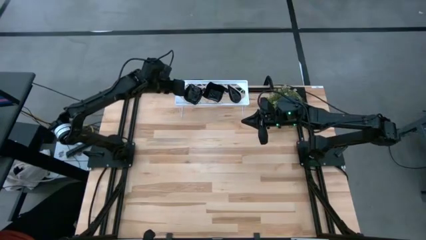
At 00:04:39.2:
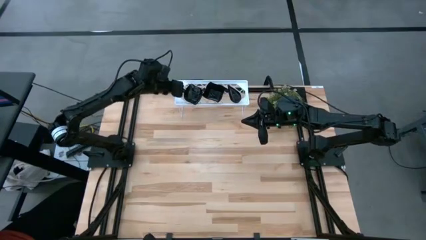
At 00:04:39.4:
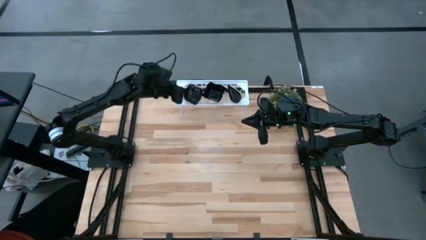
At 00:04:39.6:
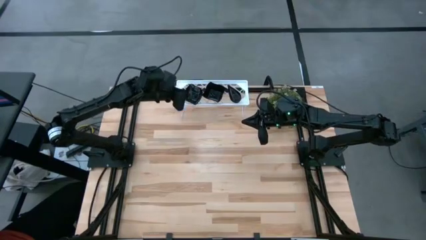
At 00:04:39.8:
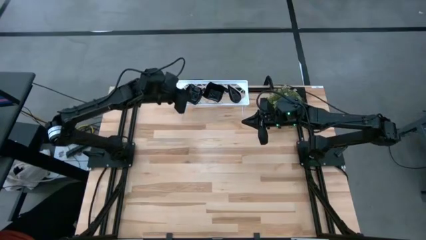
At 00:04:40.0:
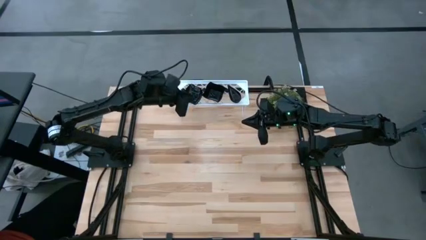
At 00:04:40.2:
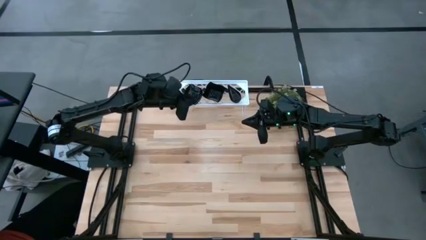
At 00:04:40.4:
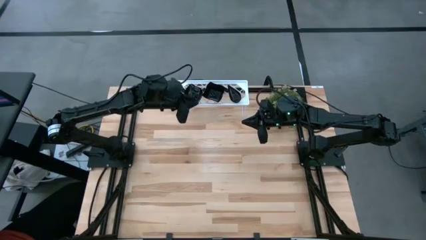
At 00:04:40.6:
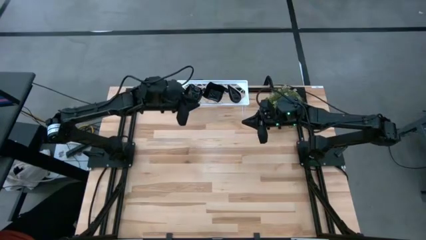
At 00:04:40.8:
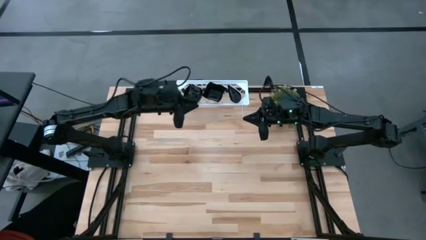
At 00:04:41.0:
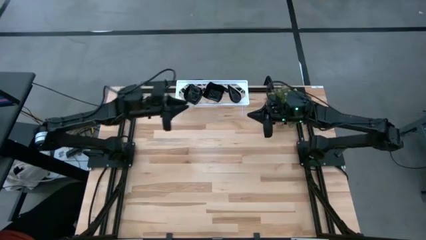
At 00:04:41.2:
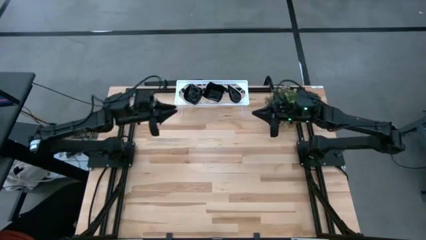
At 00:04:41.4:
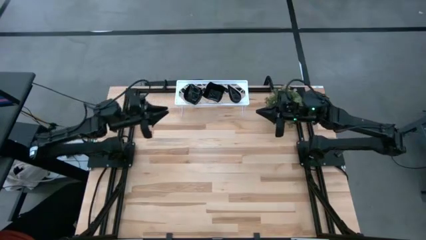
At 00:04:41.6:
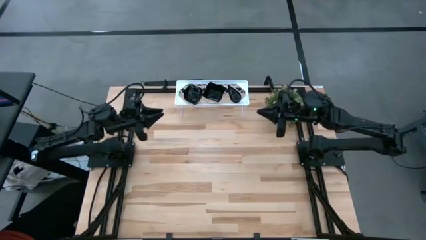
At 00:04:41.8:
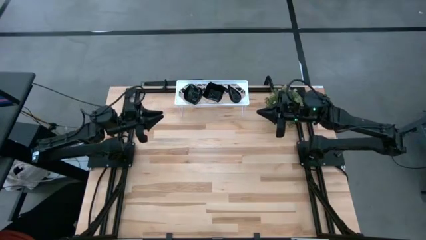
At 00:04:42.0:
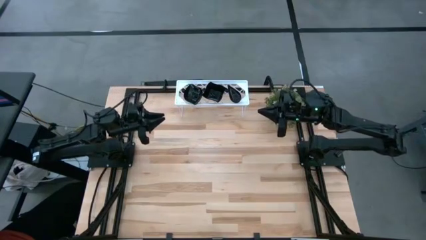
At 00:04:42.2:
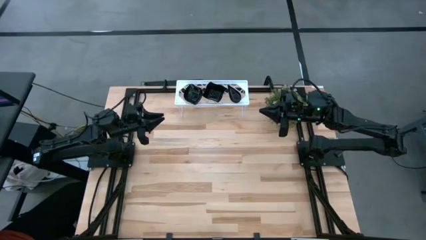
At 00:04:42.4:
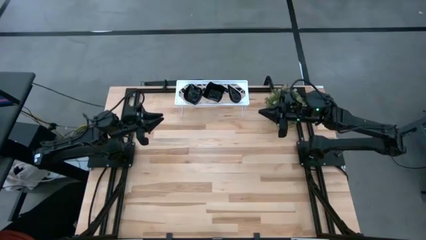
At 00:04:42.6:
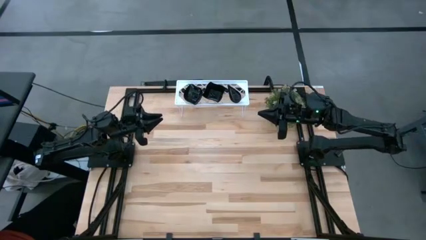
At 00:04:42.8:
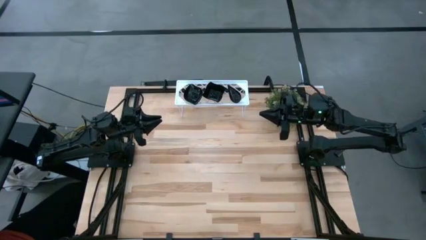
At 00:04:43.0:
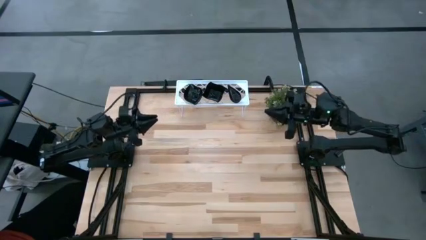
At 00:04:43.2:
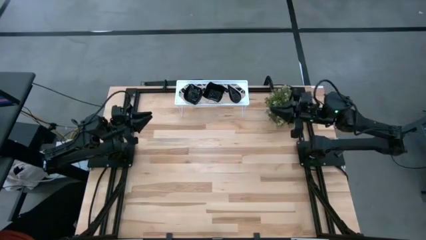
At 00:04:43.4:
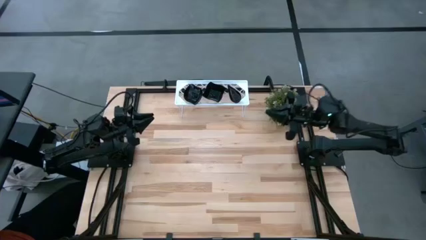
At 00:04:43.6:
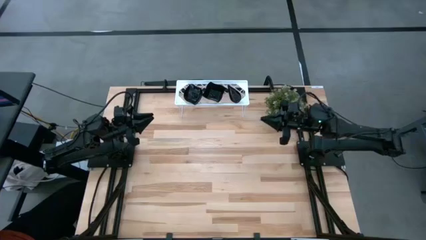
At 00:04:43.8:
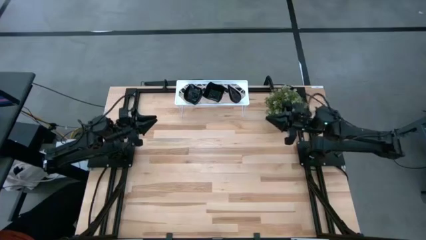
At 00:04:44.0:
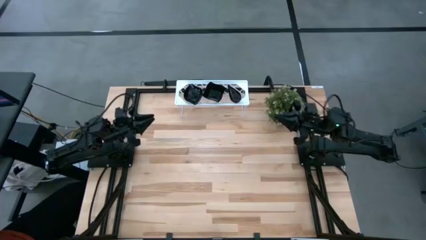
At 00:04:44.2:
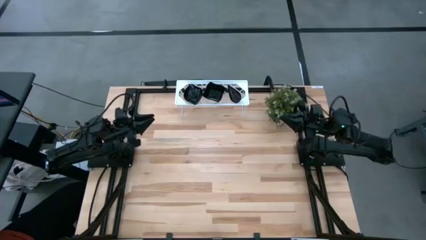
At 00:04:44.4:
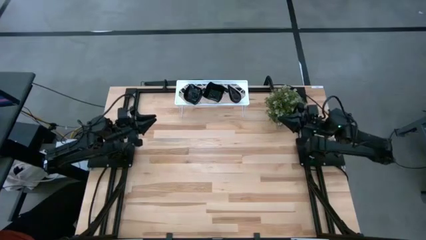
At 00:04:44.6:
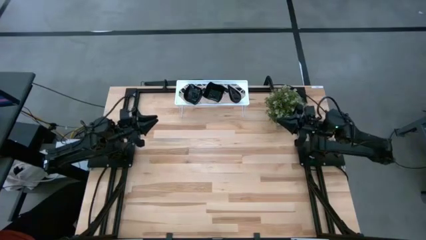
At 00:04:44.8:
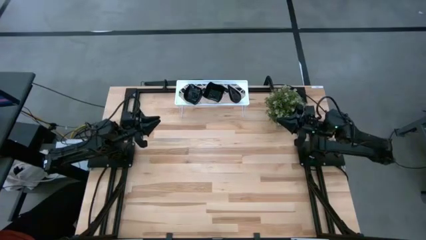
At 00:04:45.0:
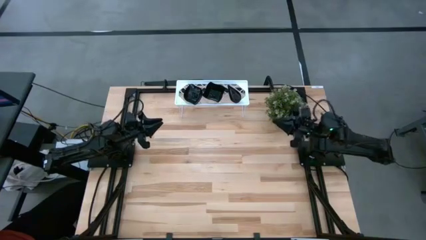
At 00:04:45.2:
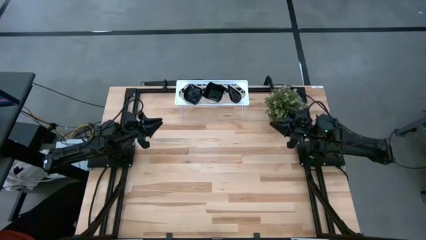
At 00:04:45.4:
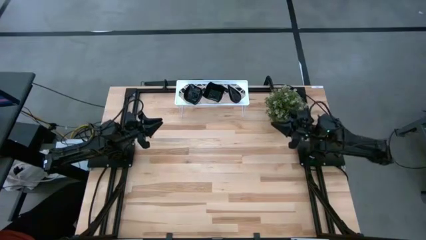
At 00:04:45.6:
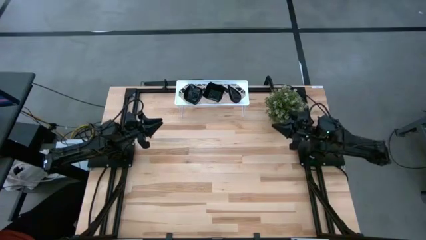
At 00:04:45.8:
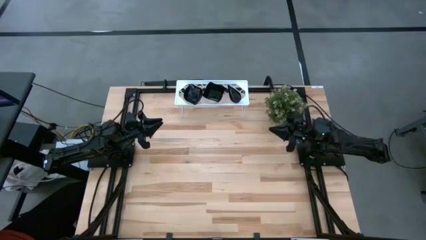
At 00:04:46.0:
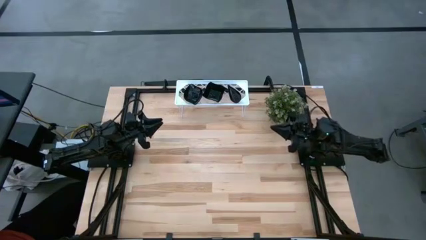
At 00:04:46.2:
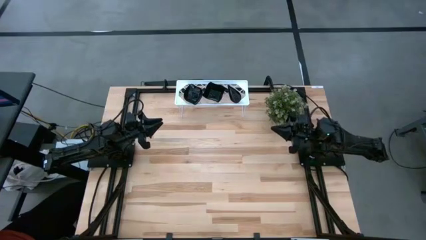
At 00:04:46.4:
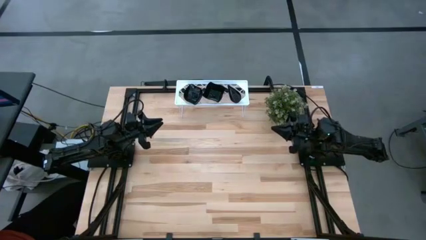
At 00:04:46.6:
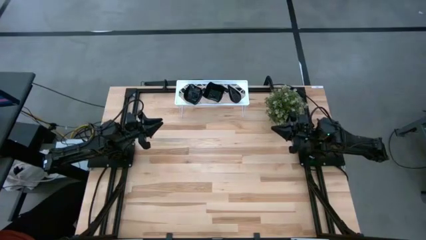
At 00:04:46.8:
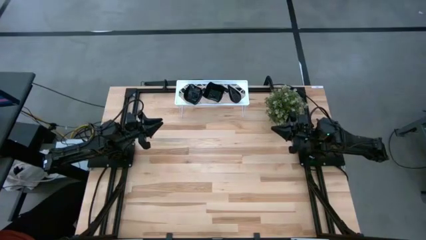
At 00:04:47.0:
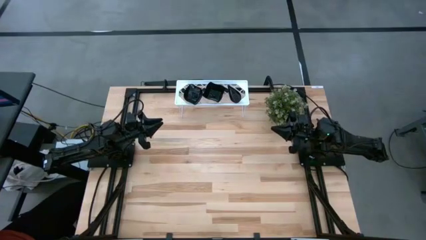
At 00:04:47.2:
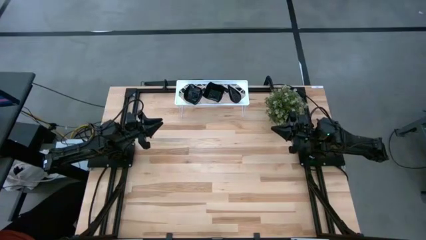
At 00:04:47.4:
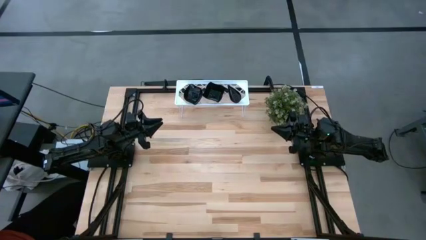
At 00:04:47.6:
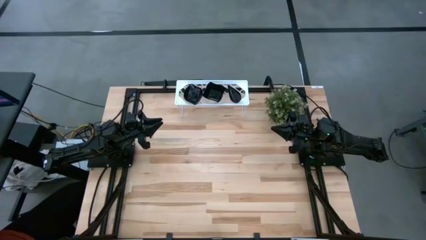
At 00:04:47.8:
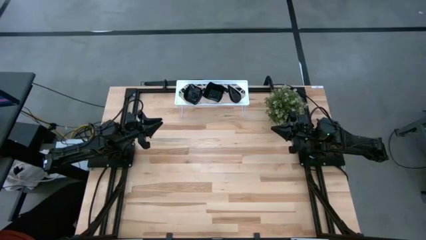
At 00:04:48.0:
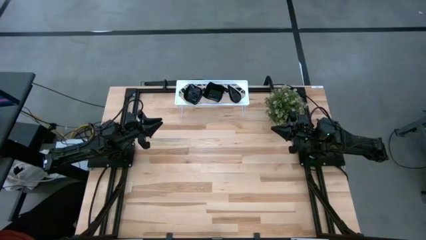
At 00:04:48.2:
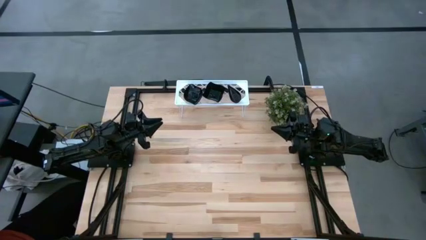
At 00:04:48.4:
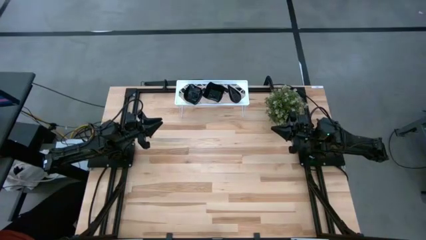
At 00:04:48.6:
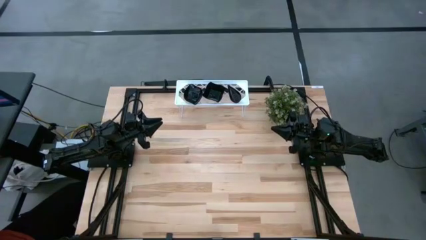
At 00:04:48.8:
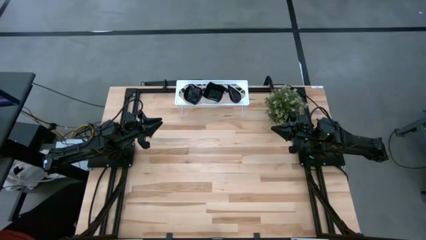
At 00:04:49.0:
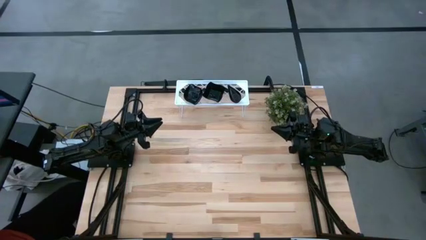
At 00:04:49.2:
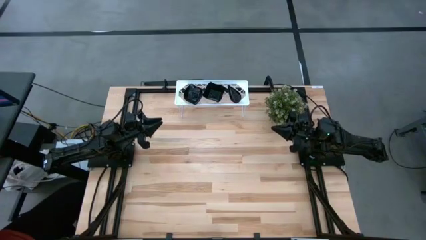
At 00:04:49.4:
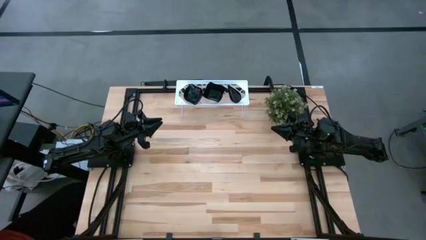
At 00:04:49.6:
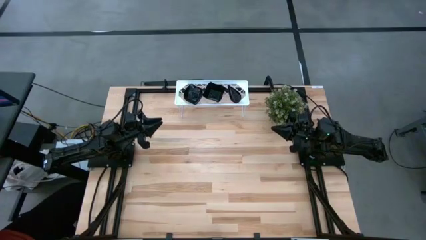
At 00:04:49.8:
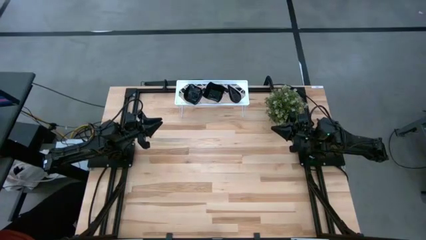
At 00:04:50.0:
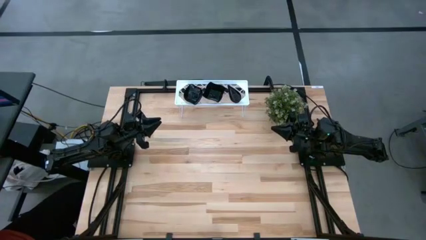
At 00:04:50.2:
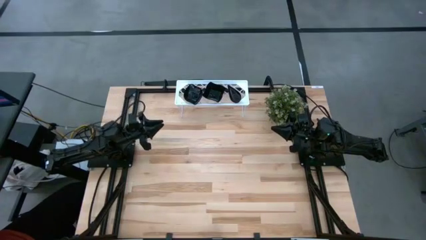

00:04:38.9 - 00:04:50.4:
Task: Pick & Place Mini shaped plates
Return to home position

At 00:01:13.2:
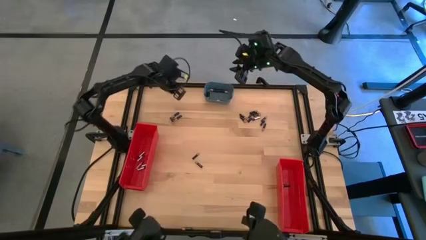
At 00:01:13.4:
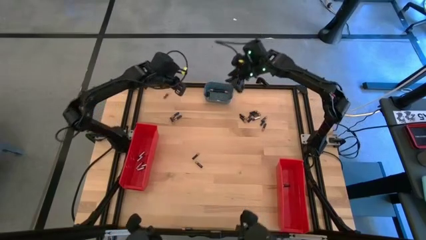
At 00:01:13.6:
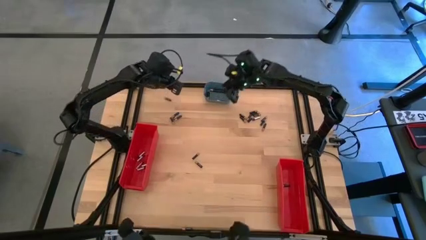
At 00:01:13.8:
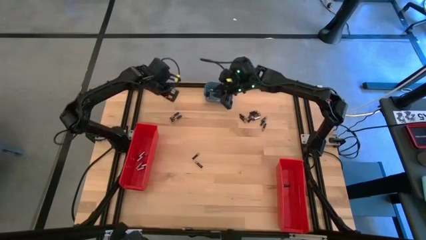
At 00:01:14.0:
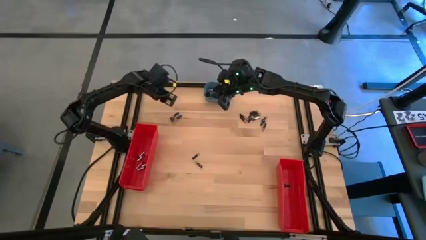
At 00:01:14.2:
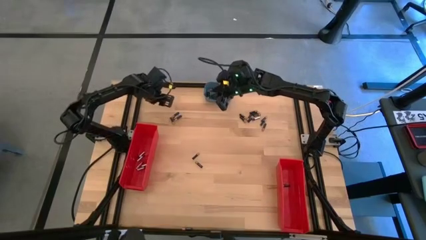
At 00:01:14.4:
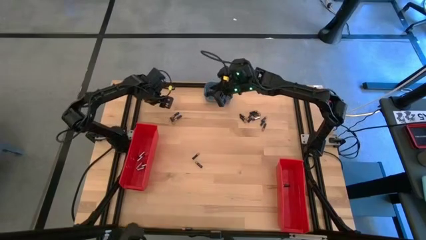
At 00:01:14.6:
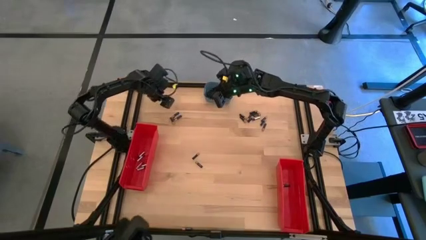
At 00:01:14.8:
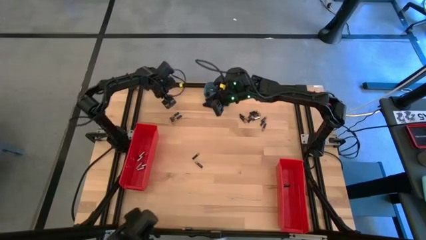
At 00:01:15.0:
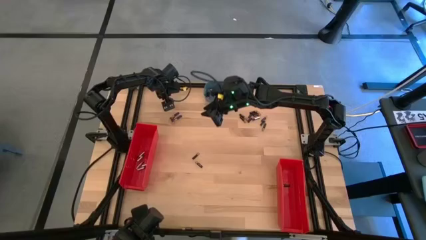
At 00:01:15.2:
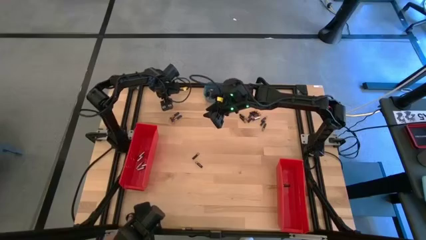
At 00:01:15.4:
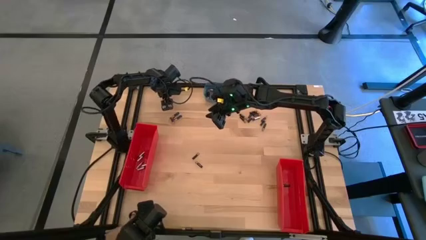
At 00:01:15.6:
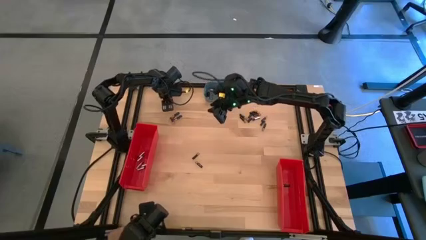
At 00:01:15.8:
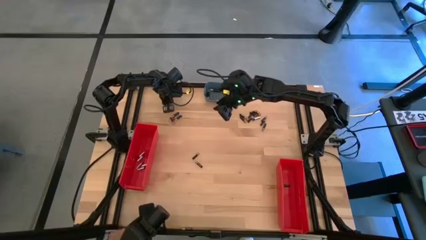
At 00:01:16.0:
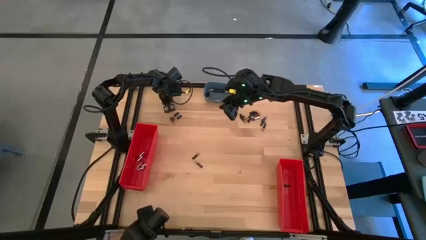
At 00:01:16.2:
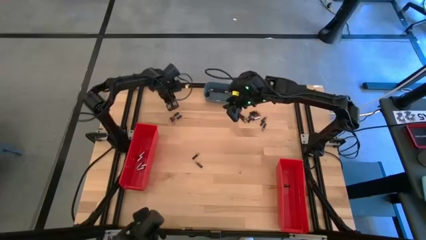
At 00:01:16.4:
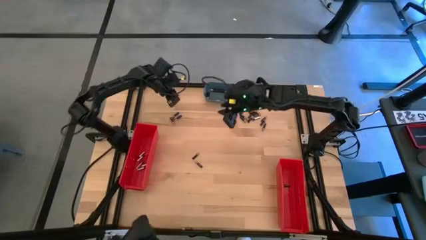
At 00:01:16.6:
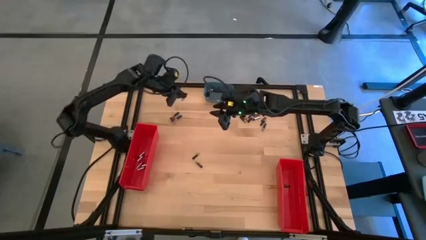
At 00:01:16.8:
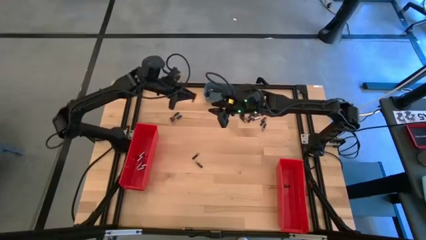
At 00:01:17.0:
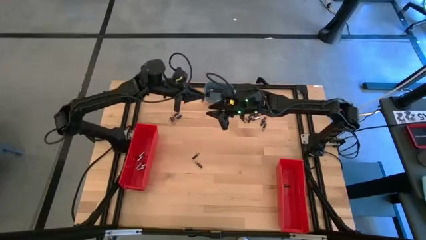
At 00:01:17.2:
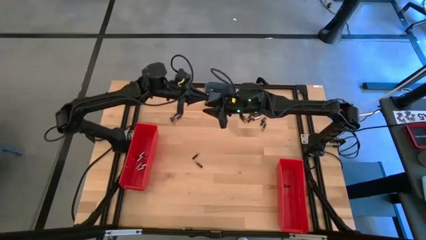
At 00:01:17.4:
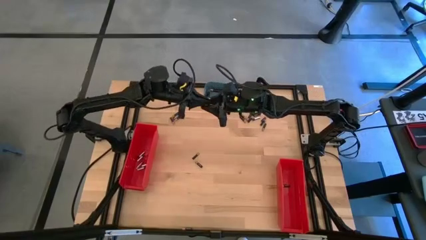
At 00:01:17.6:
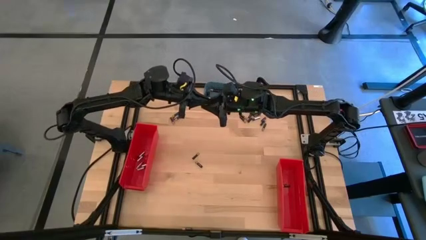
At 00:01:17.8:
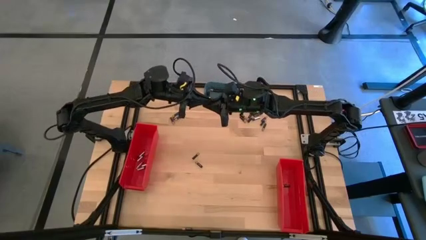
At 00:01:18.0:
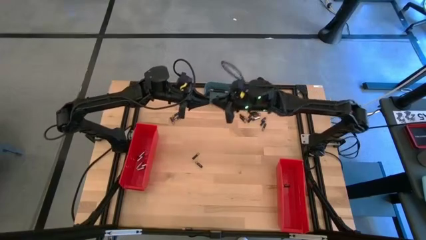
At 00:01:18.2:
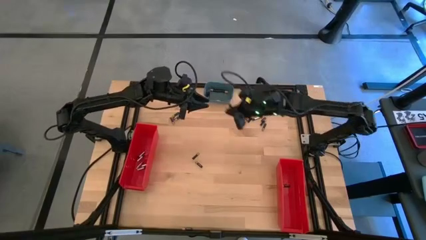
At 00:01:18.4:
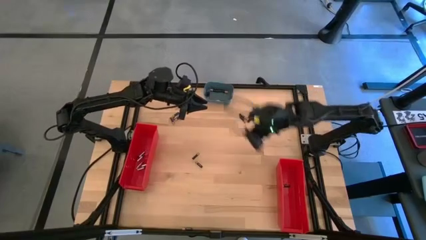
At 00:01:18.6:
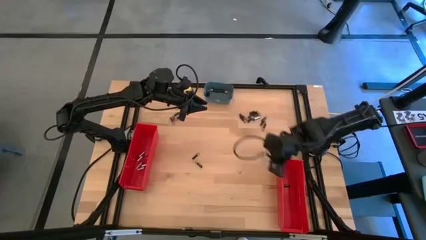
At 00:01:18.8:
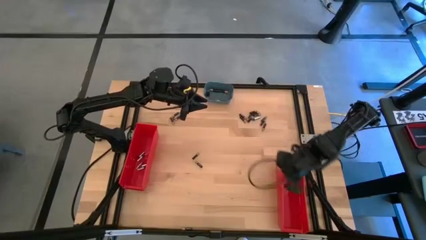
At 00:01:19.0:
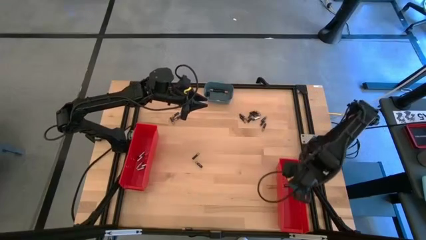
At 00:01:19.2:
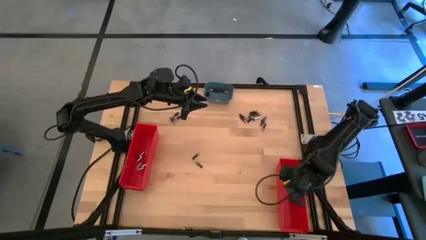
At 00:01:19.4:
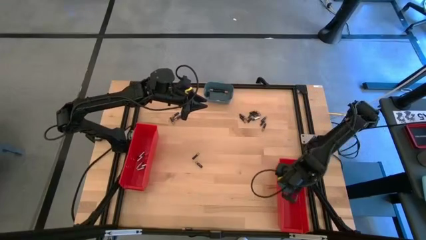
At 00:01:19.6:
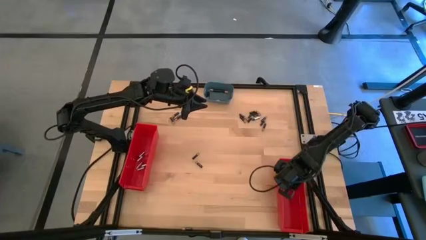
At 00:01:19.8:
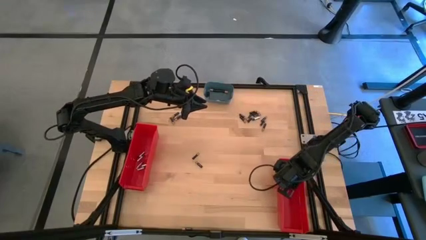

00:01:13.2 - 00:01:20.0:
Task: Sort batteries
Put the small brown battery into the right red bin
